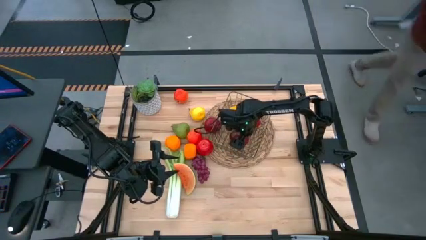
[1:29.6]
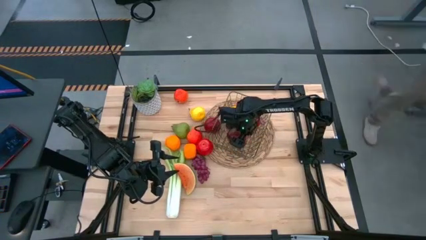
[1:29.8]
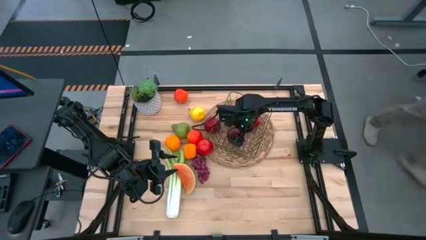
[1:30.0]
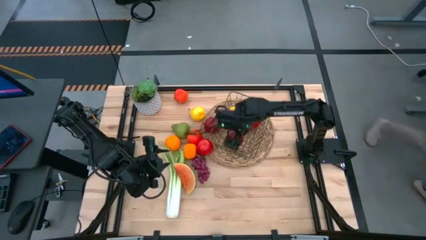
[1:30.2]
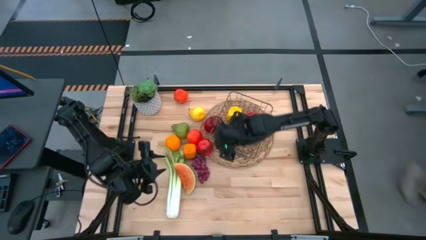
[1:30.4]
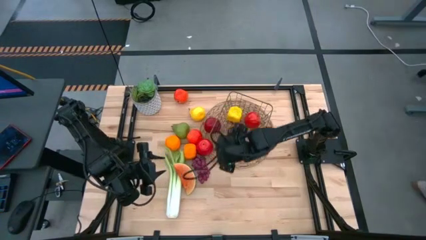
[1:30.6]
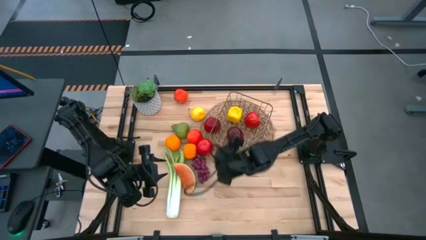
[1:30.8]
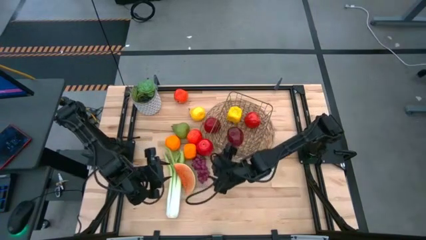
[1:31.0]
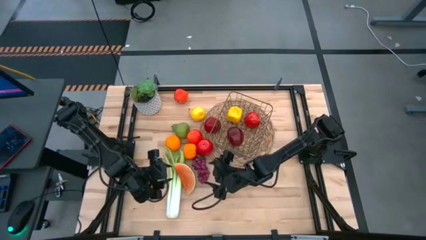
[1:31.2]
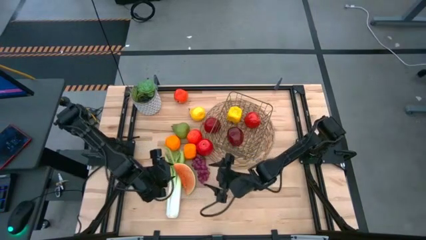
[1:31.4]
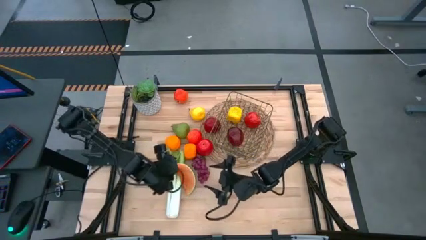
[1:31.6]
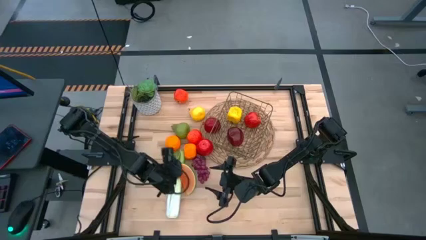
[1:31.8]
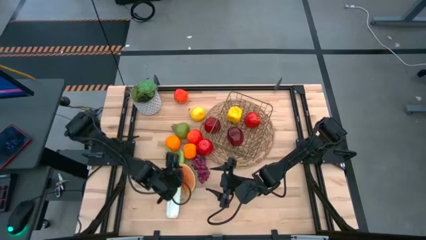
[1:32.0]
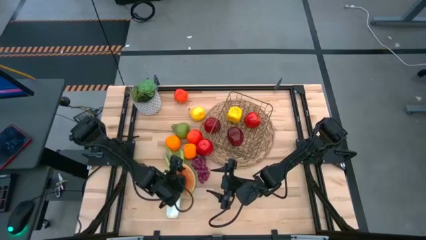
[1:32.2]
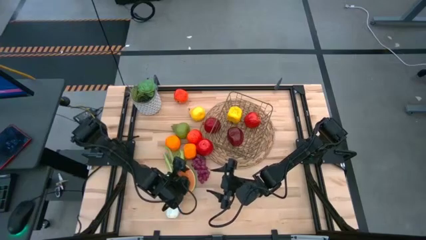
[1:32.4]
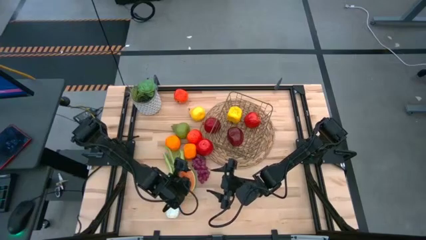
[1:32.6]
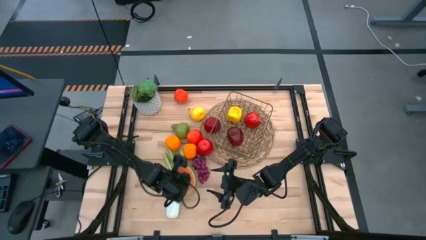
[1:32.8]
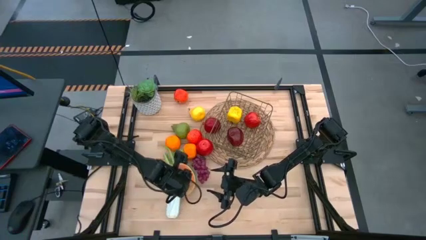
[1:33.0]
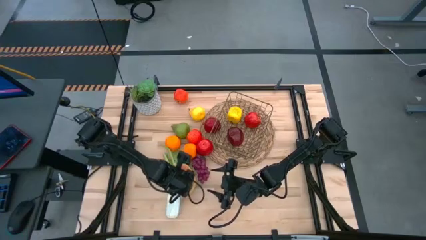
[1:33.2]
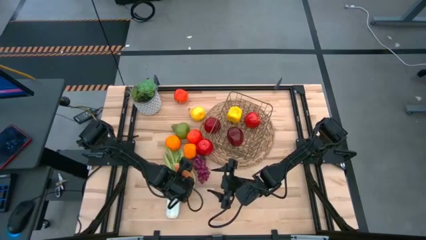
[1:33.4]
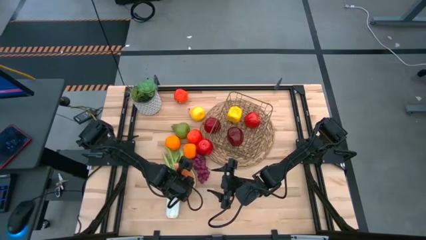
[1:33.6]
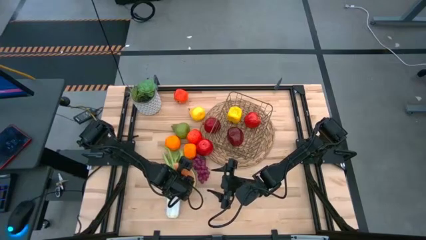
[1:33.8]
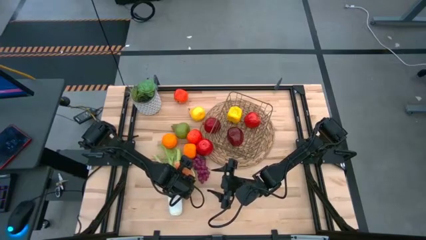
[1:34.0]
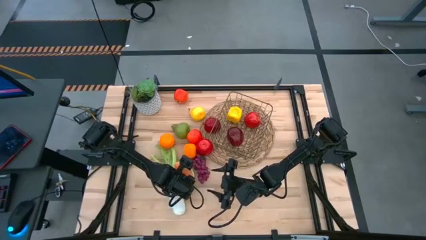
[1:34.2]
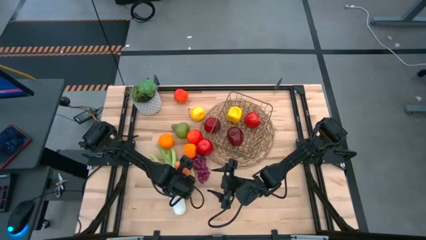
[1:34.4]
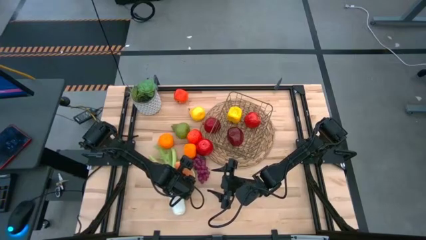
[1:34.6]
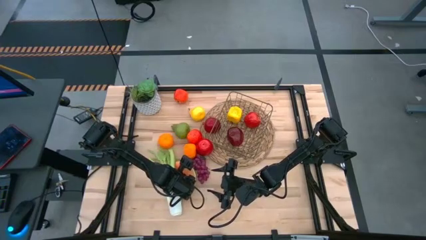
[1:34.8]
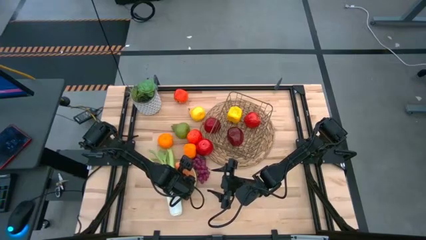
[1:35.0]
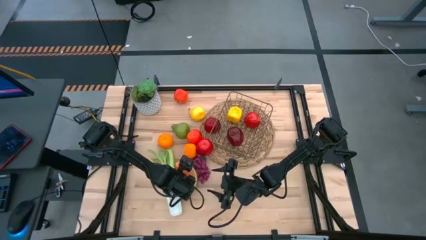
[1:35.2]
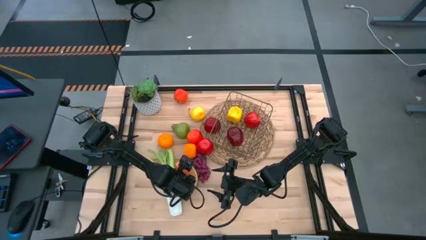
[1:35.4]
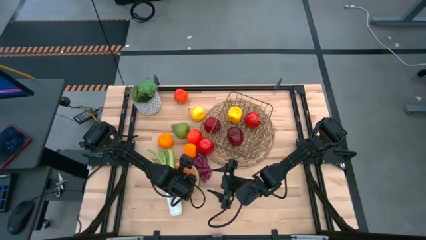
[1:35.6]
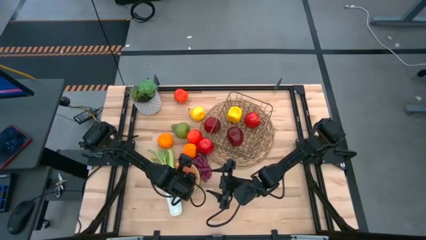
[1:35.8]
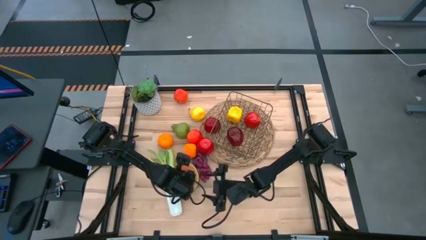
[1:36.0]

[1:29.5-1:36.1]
Task: Build produce basket
Put the red watermelon into the gold wire basket

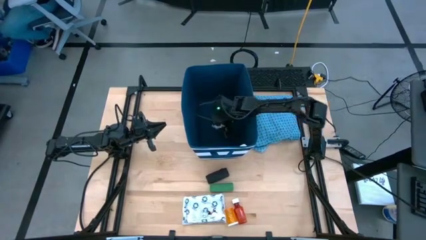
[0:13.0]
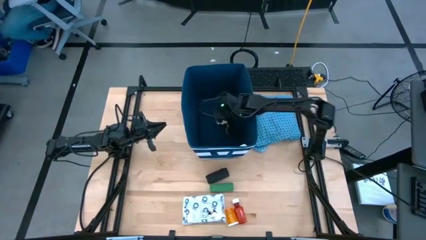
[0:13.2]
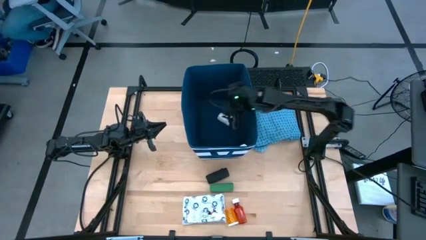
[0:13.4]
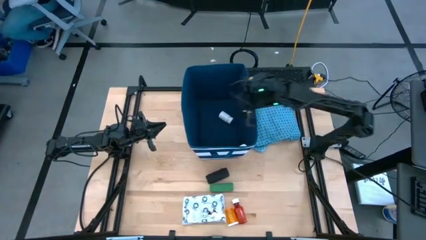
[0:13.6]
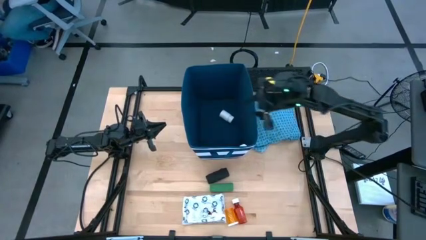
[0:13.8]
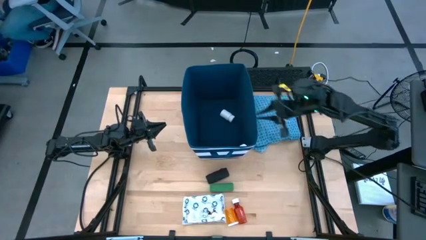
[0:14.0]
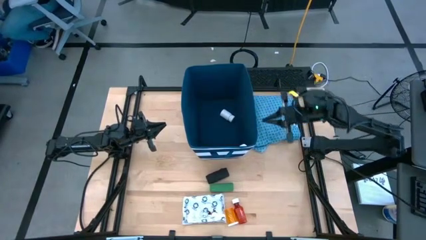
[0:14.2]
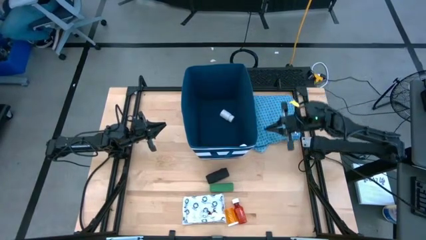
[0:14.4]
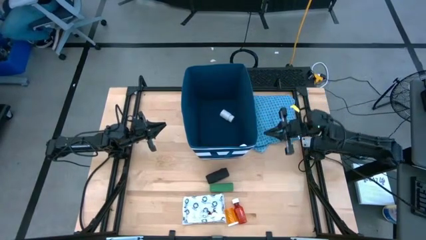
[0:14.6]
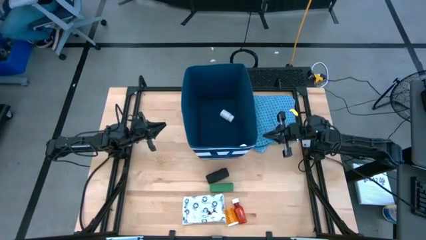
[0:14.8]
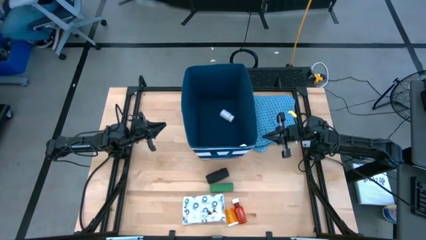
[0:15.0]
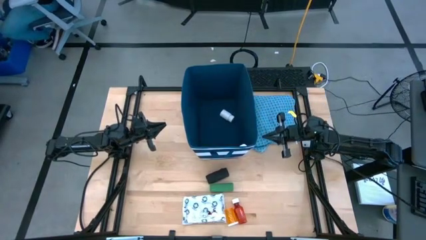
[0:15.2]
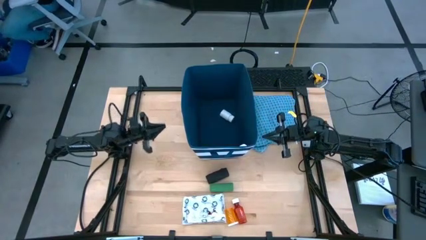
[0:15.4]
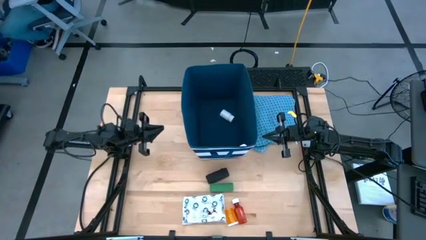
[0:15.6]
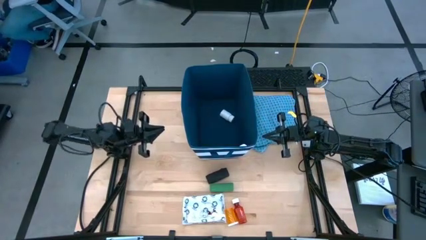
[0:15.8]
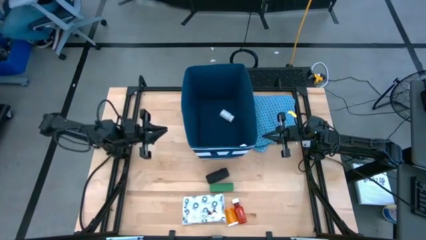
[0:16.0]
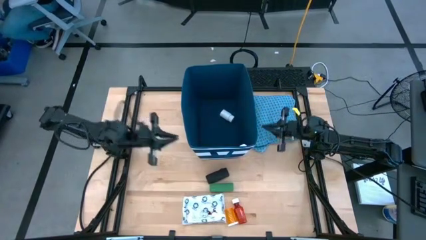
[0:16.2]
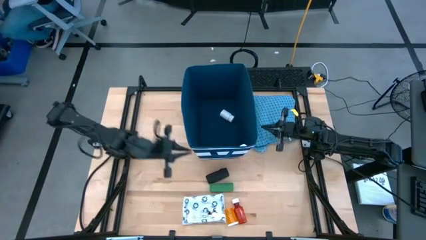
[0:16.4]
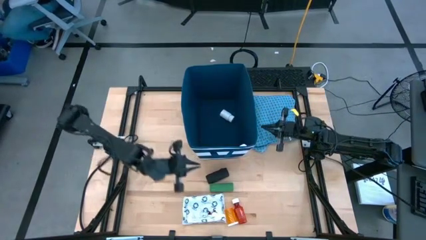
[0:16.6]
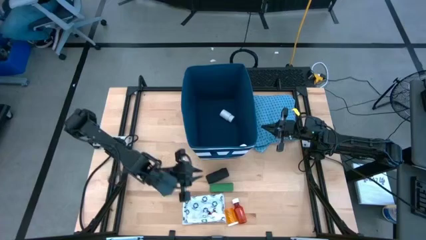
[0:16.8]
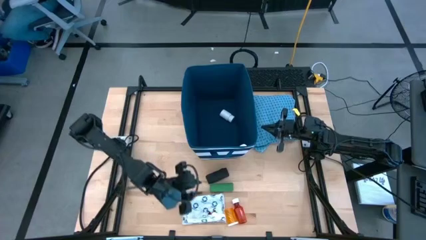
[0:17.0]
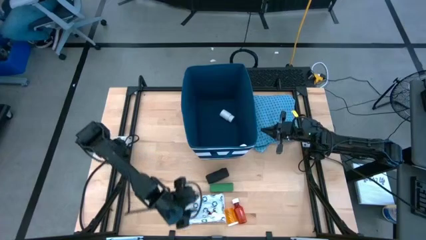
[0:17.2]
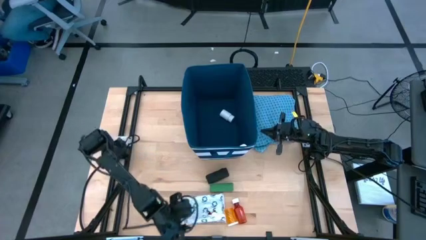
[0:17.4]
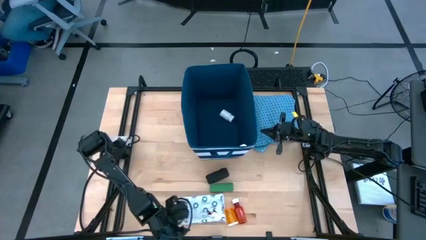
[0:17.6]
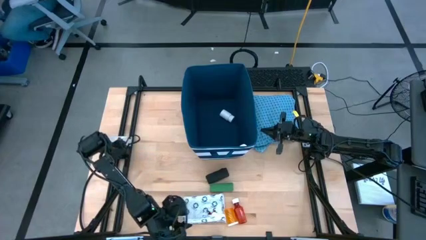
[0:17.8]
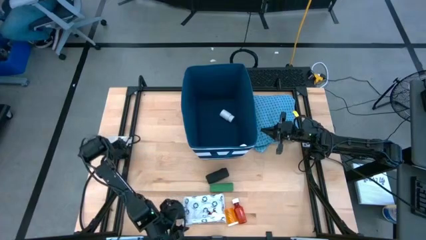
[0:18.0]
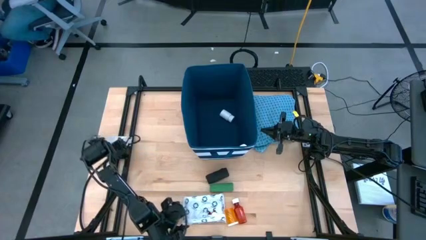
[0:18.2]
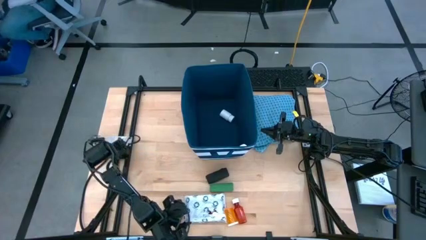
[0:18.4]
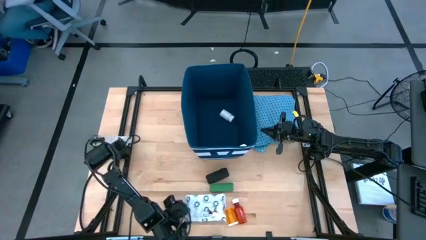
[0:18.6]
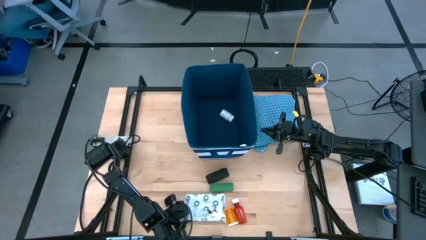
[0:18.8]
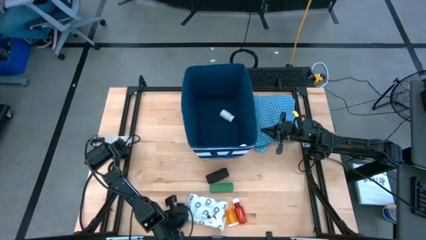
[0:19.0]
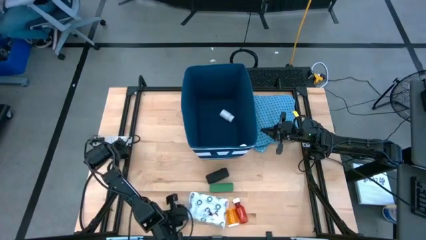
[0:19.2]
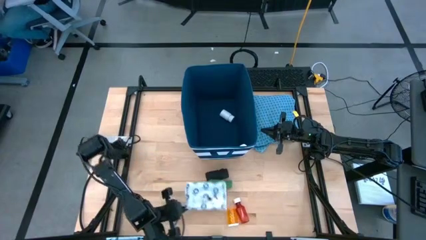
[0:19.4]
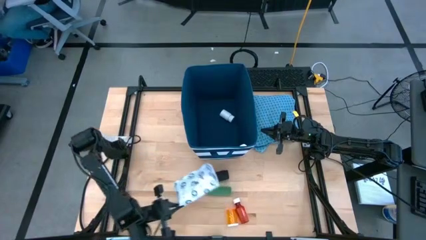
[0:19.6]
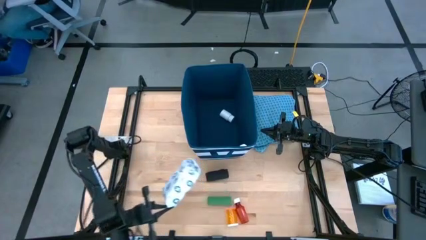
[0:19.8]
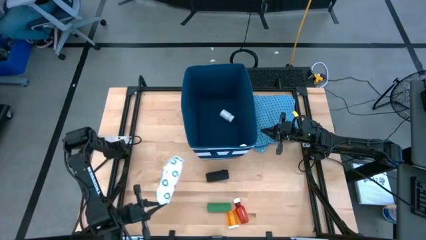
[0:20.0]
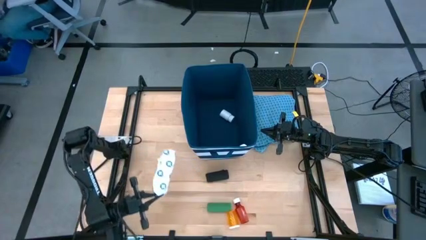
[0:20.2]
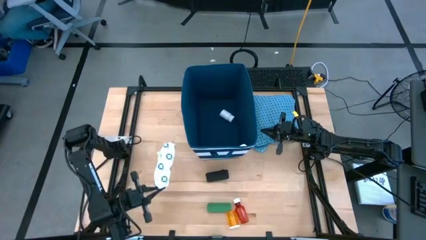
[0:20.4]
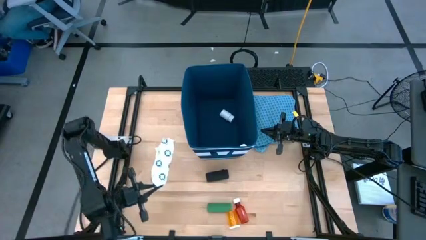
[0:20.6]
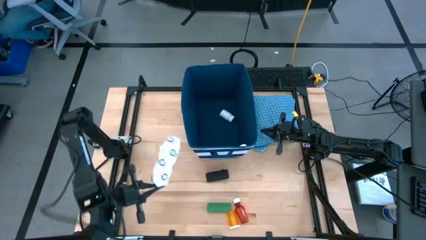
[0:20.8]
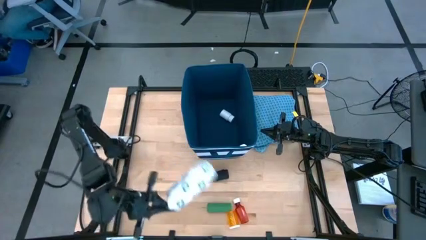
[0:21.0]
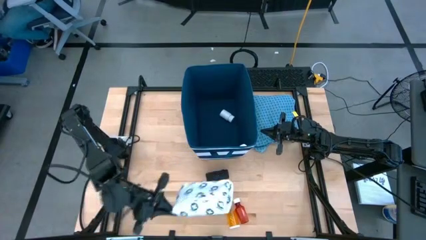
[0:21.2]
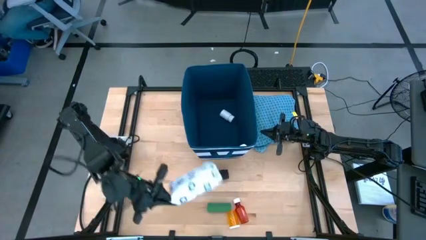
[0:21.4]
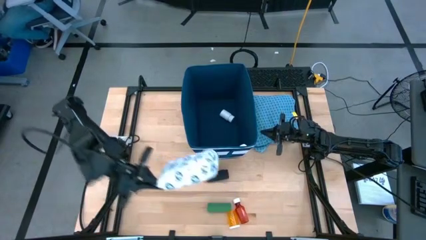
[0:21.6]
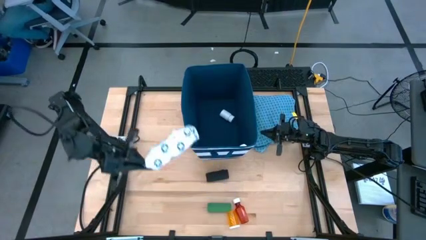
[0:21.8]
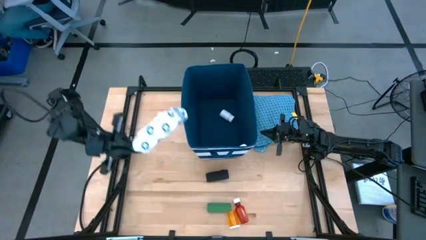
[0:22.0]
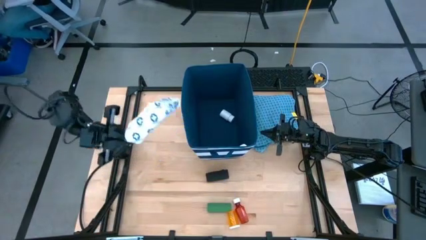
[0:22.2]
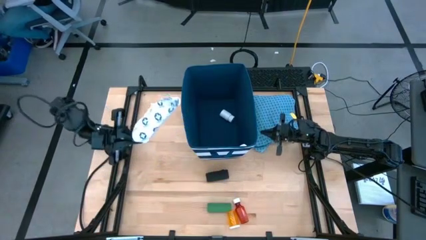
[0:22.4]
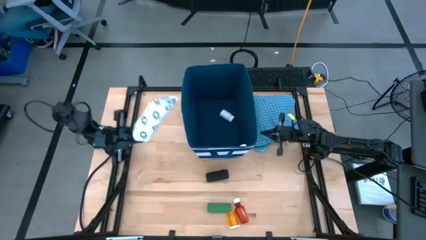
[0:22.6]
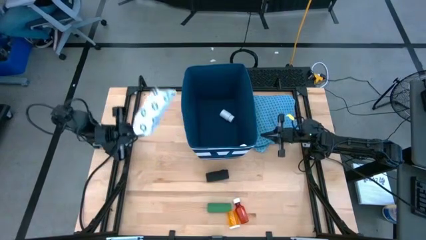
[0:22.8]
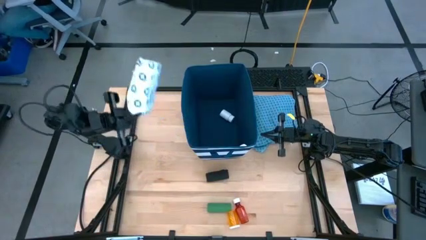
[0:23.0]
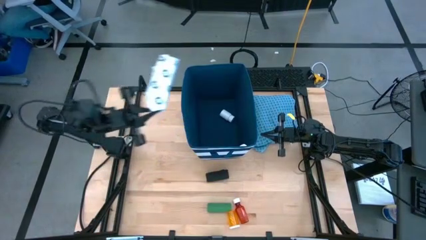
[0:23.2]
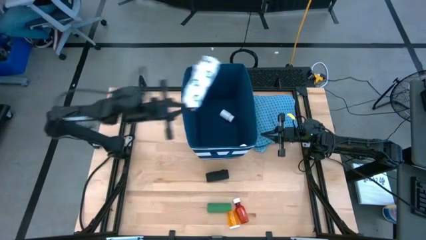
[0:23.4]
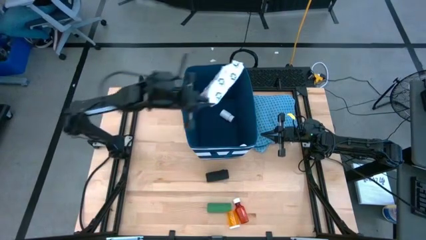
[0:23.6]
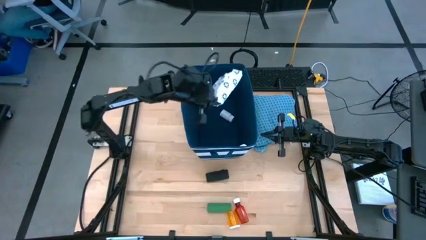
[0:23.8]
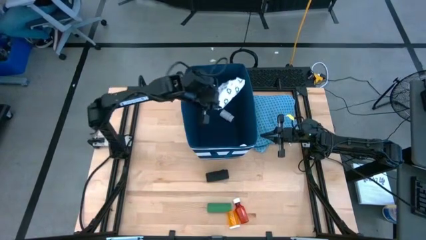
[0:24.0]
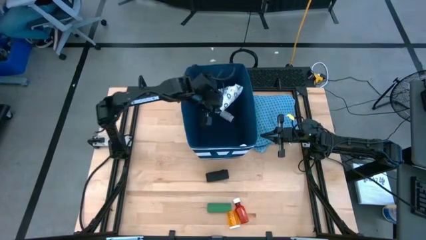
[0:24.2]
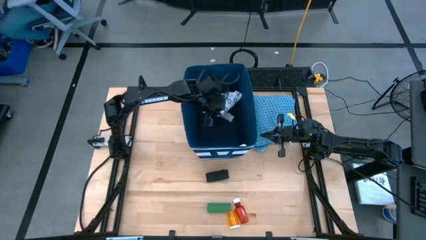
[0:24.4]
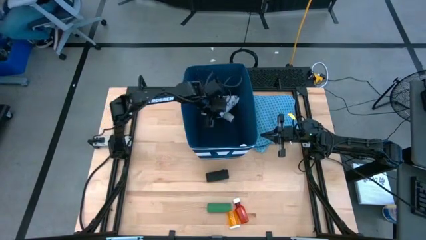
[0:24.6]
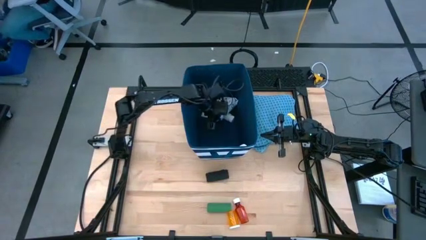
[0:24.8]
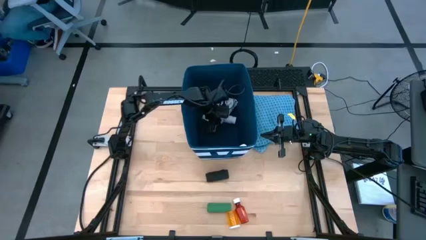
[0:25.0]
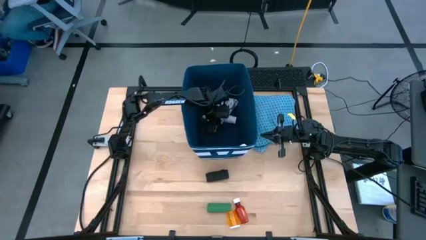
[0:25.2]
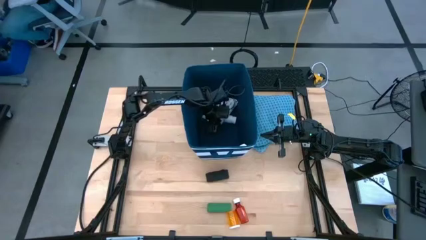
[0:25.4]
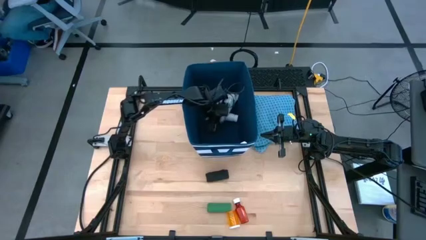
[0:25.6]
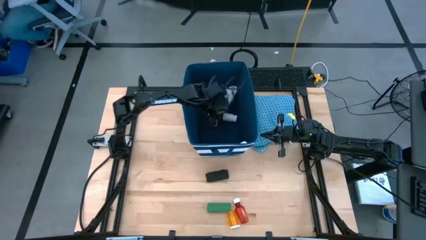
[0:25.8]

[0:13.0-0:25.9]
Task: Pick & place medical supplies in basket/bin
Put the white mailer bag into the blue bin
